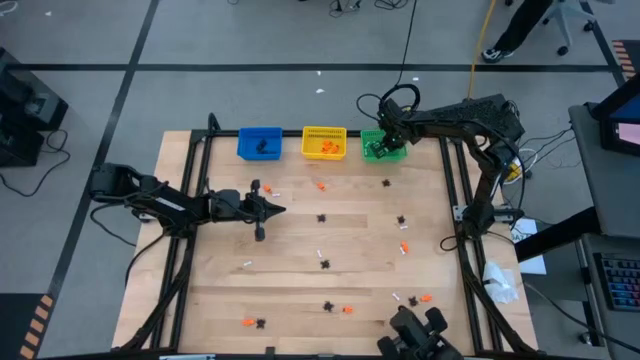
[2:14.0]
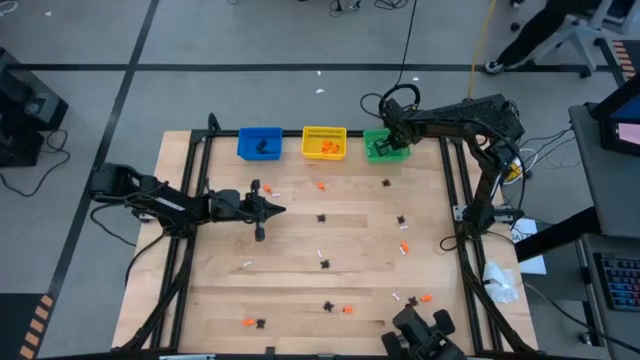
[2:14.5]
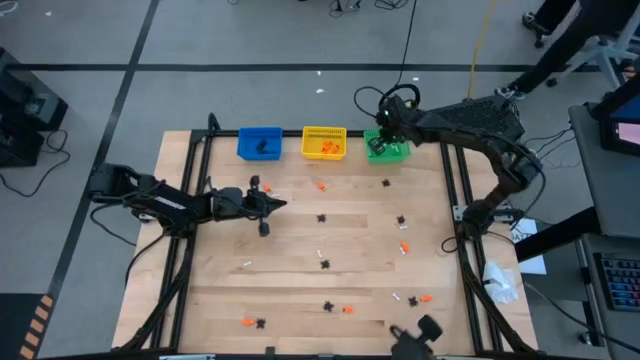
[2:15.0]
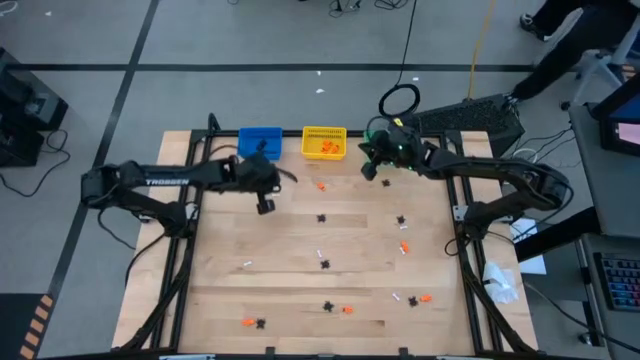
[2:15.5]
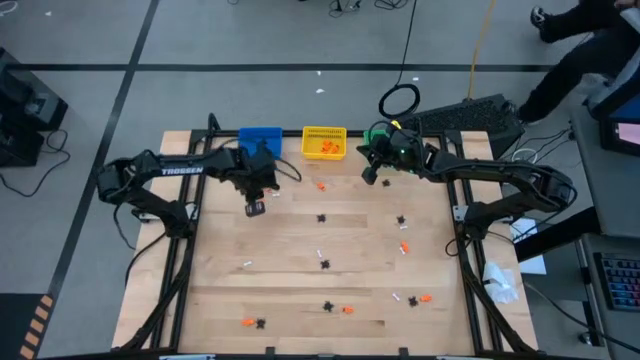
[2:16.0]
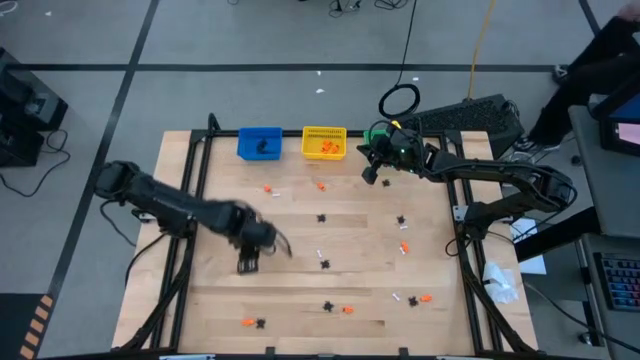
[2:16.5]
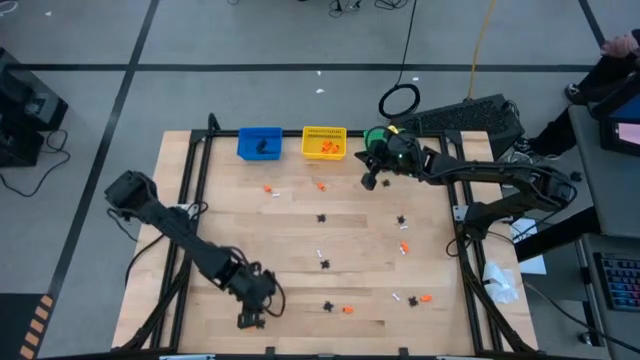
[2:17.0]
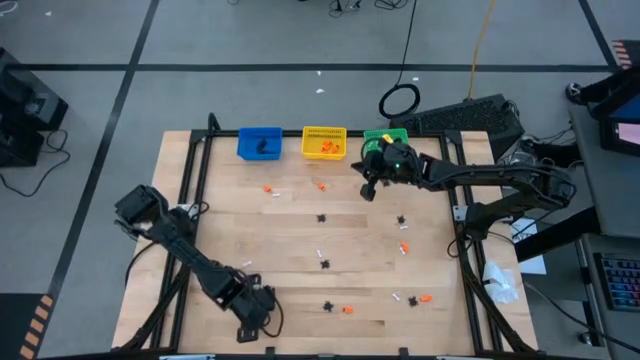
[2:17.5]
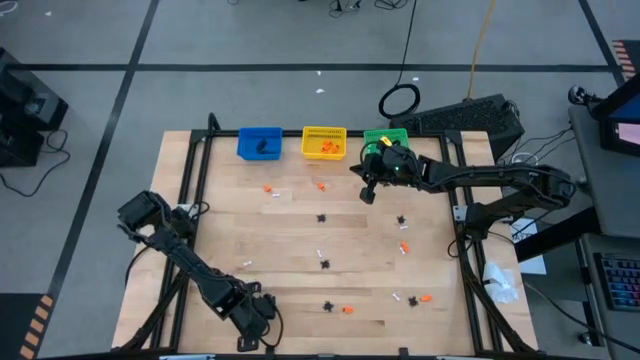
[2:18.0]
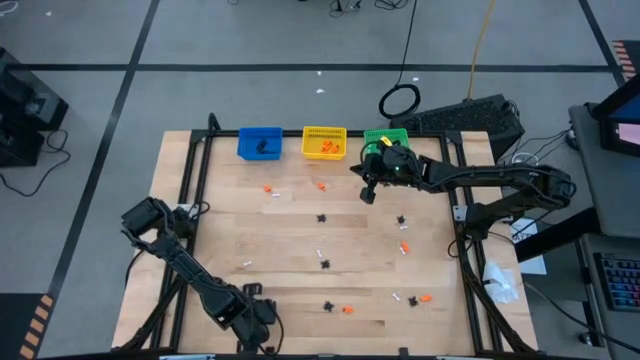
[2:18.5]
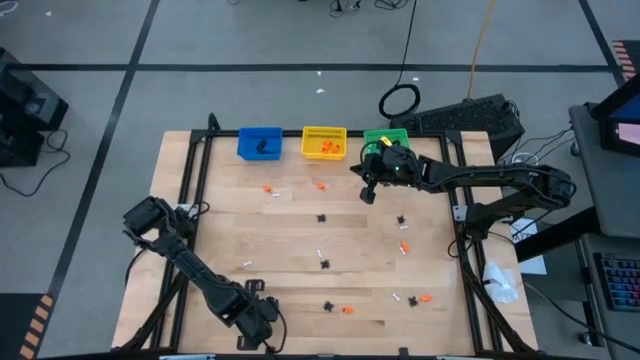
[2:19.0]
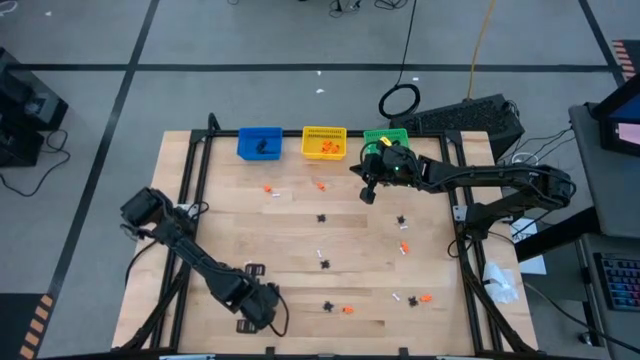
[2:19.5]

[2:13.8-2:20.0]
Task: Sort Halloween decoration
Put the black spider toy into the blue bin

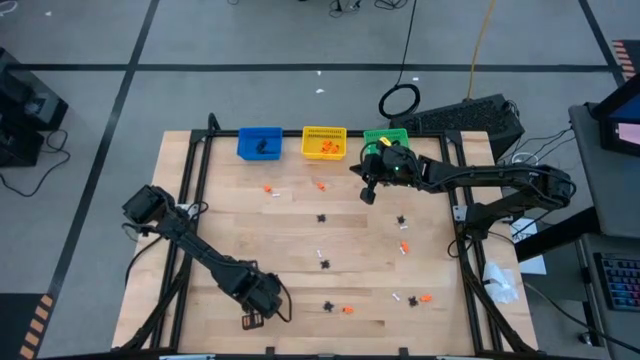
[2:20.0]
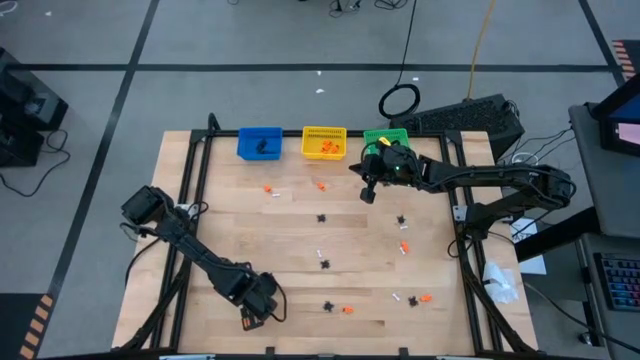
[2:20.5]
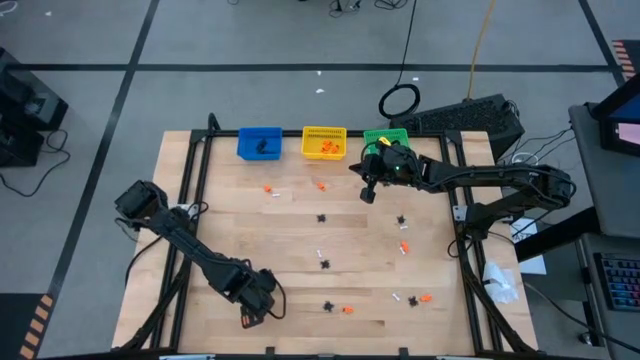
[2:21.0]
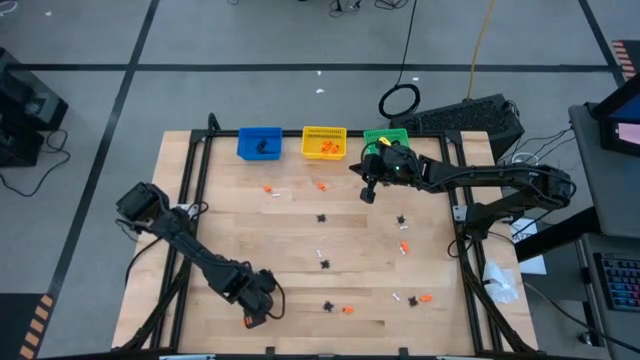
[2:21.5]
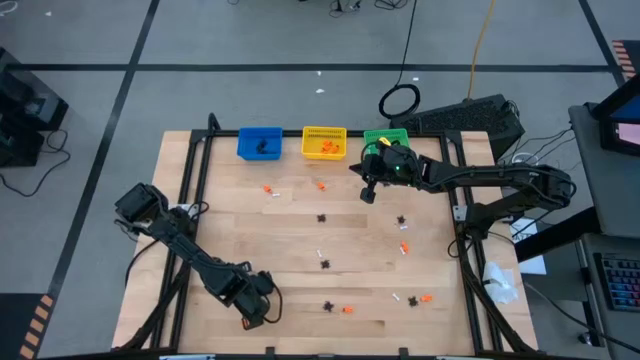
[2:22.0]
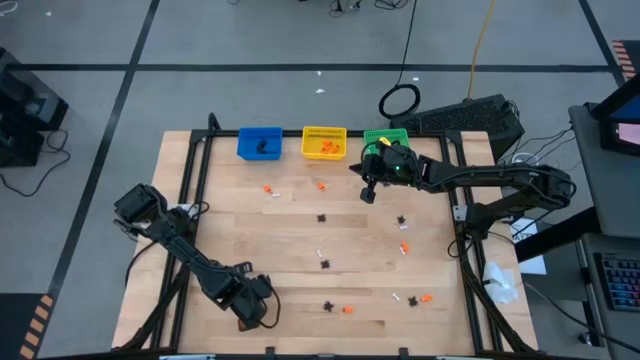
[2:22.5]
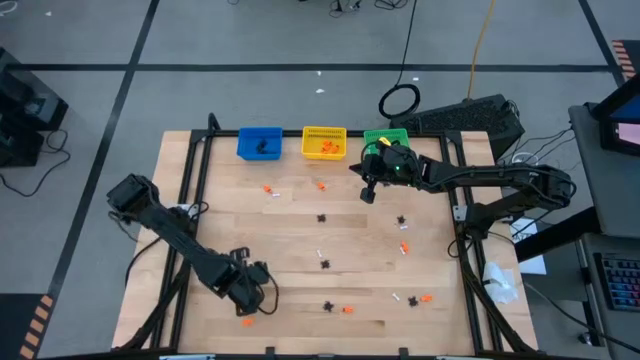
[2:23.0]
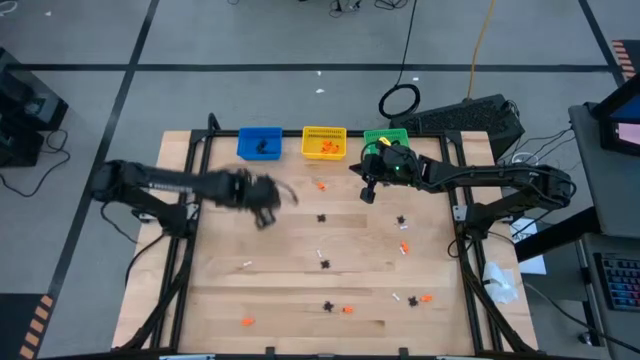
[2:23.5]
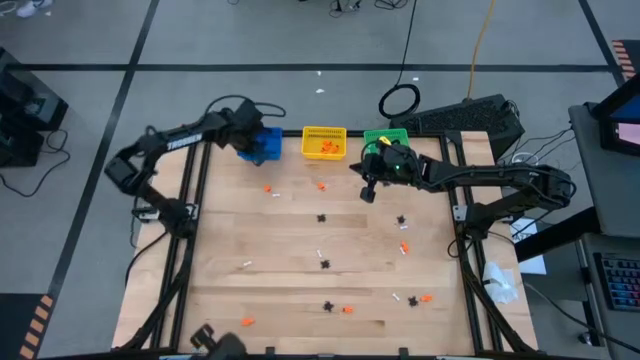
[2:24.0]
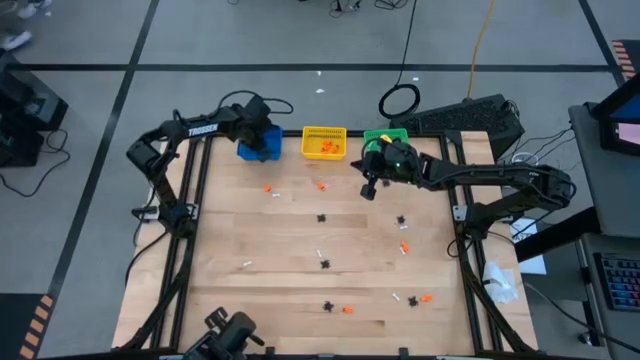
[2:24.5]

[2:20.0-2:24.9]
Put the black spider toy into the blue bin

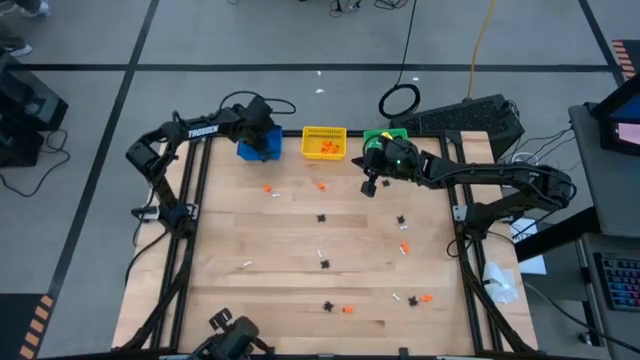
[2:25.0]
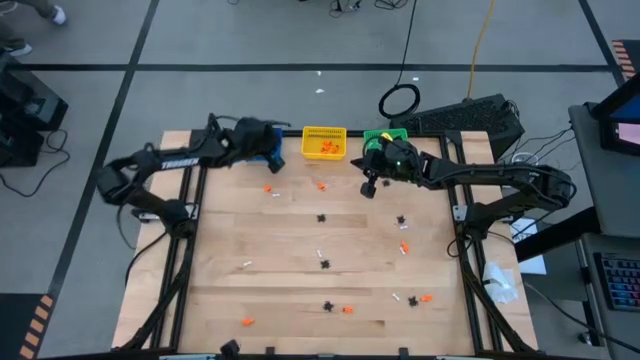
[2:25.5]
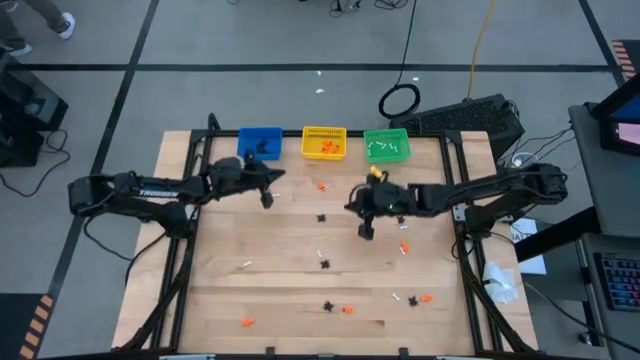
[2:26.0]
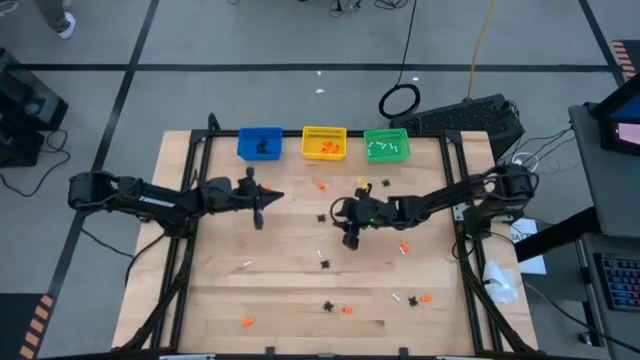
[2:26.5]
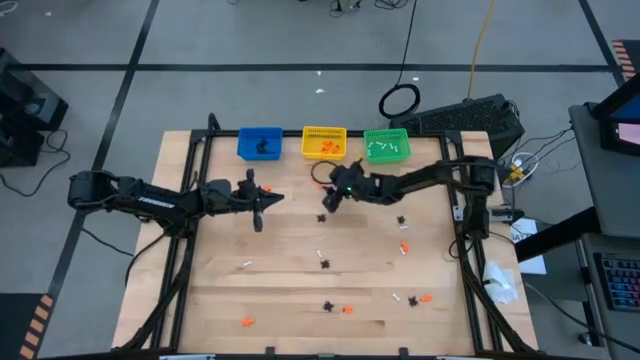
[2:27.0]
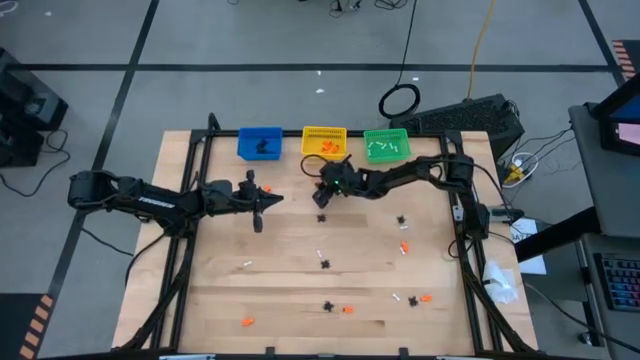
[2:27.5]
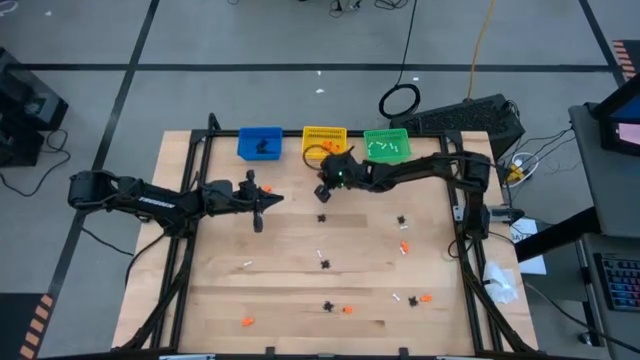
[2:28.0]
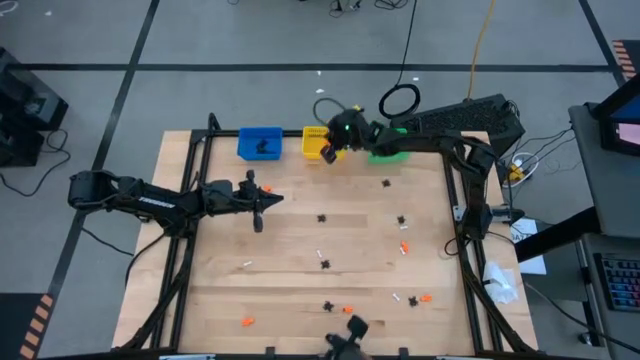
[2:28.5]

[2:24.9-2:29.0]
Put the orange skeleton toy into the yellow bin

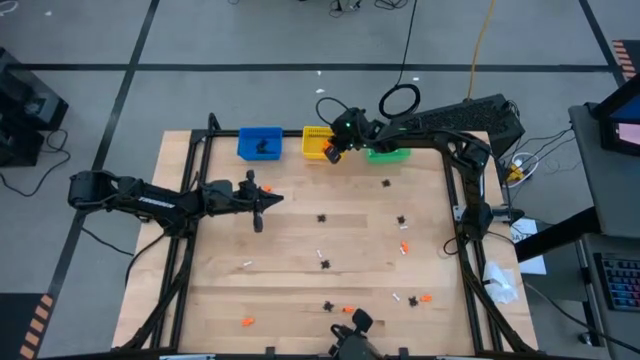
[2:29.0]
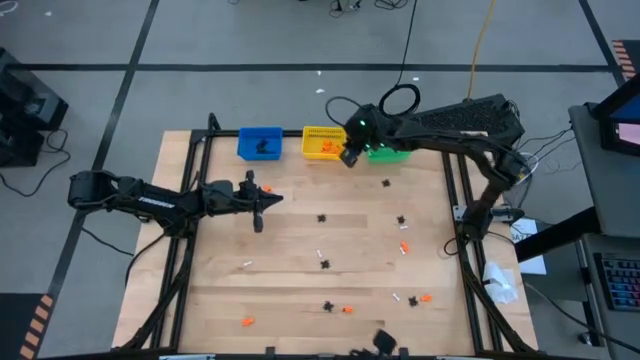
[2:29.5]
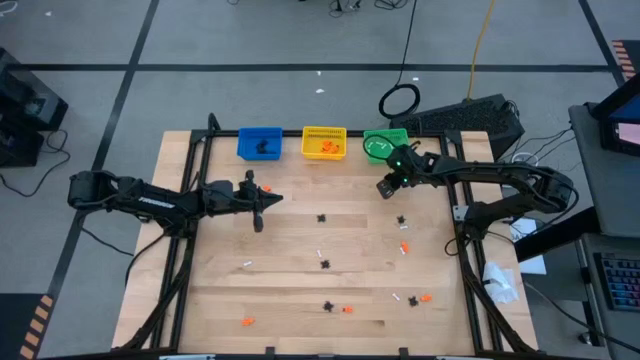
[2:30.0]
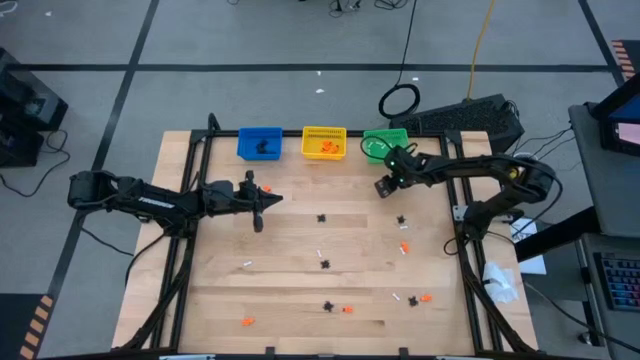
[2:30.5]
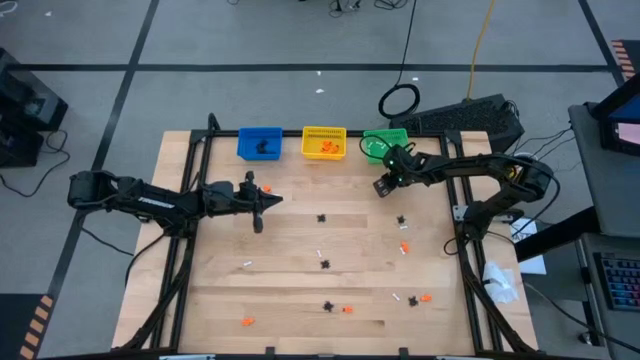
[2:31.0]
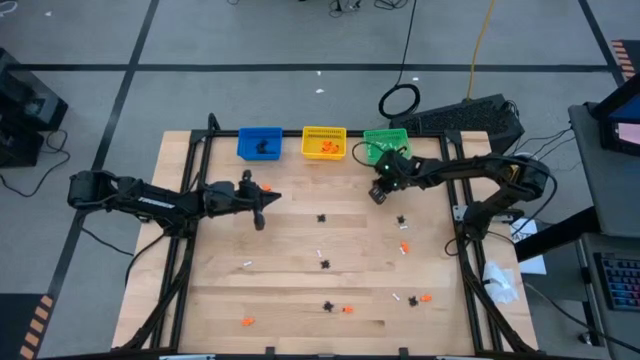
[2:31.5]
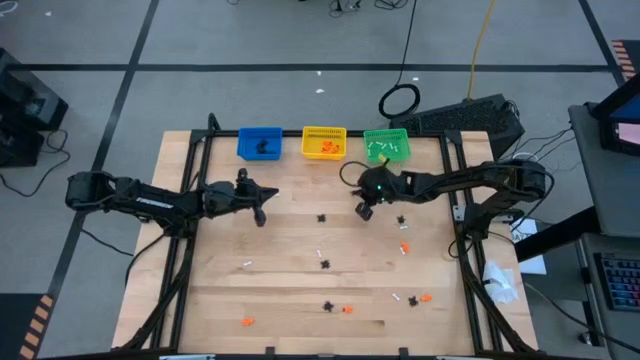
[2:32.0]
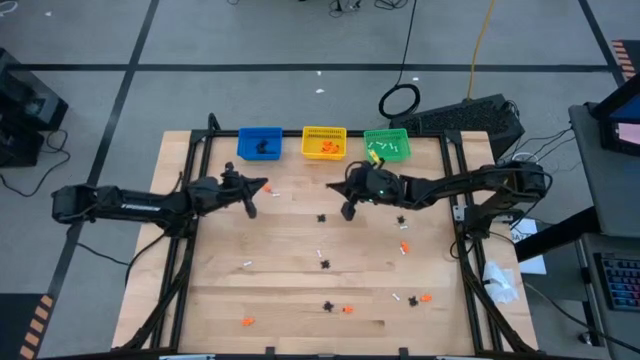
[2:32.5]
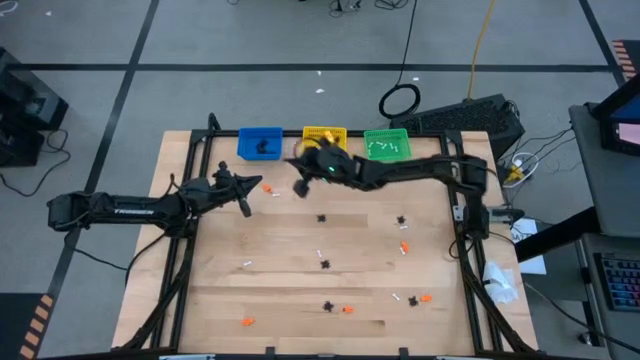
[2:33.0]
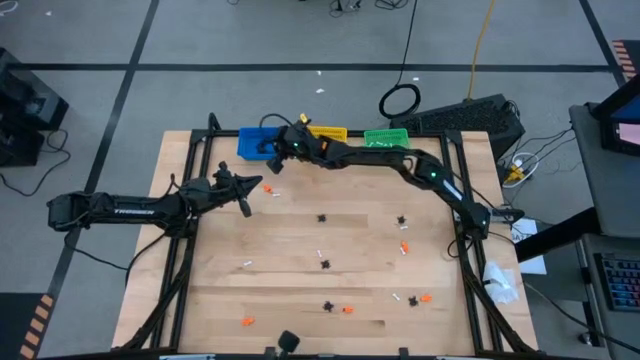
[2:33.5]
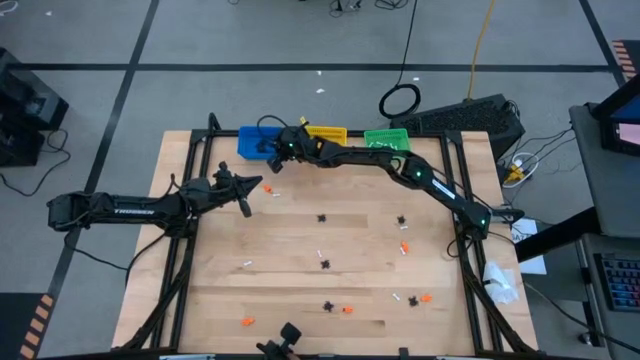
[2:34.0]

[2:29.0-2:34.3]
Put the black spider toy into the blue bin
